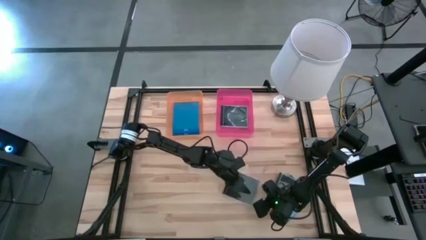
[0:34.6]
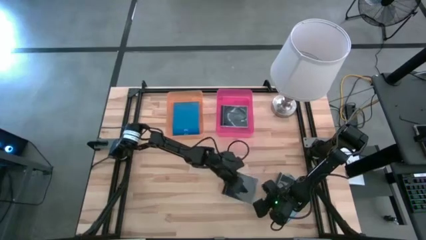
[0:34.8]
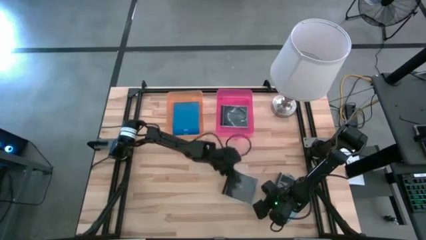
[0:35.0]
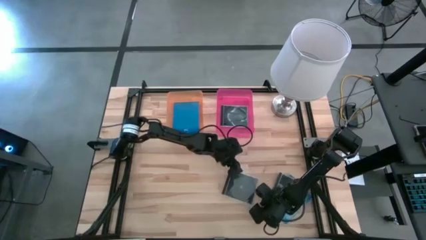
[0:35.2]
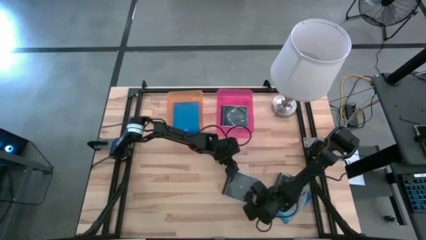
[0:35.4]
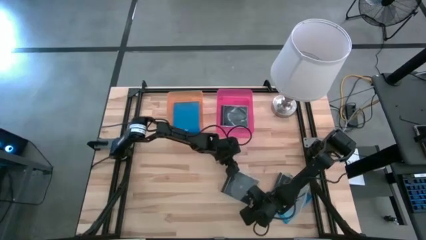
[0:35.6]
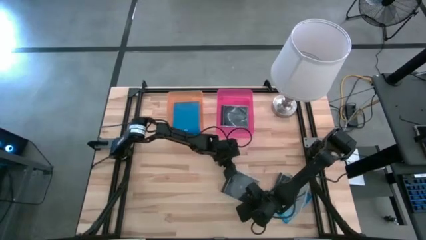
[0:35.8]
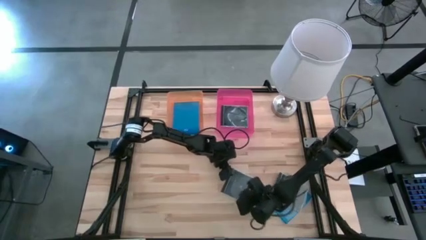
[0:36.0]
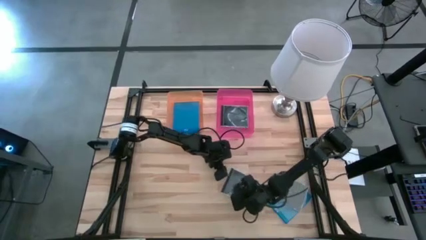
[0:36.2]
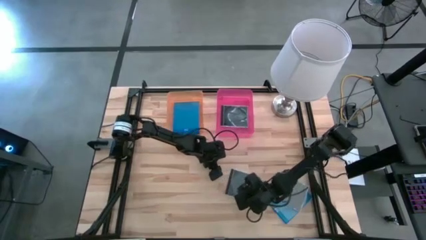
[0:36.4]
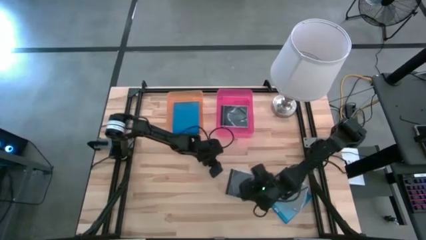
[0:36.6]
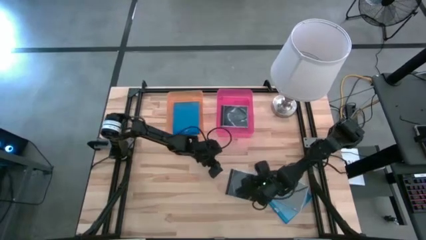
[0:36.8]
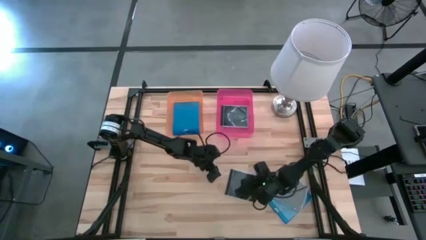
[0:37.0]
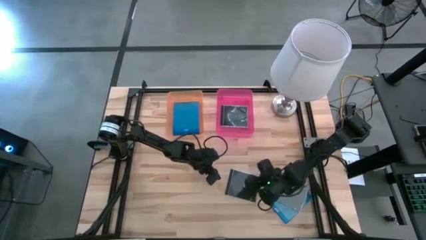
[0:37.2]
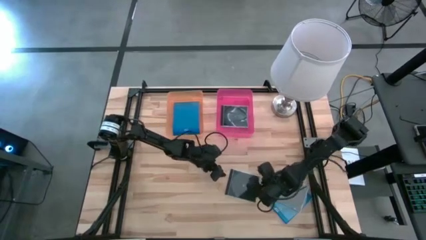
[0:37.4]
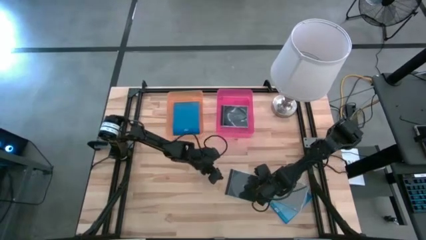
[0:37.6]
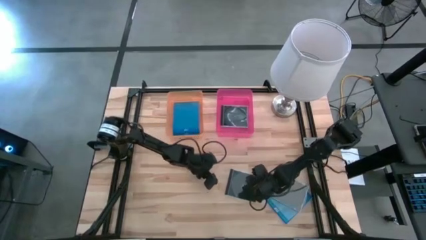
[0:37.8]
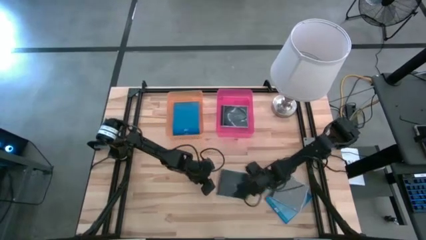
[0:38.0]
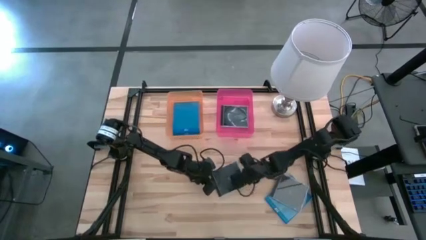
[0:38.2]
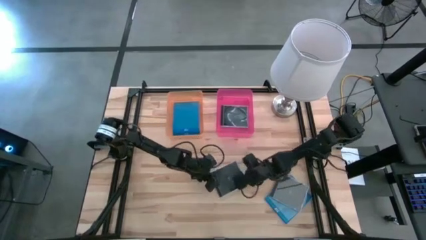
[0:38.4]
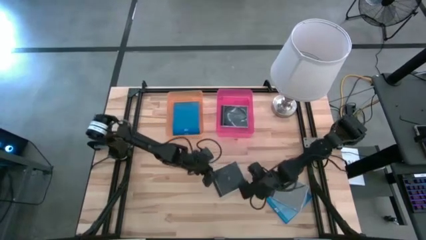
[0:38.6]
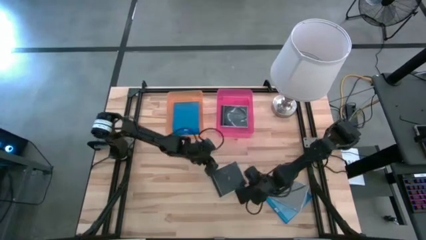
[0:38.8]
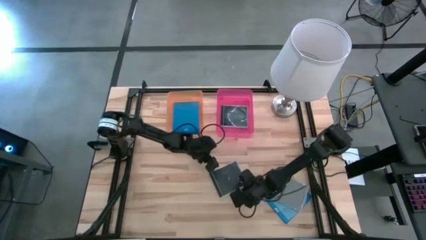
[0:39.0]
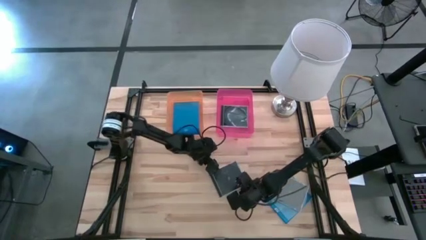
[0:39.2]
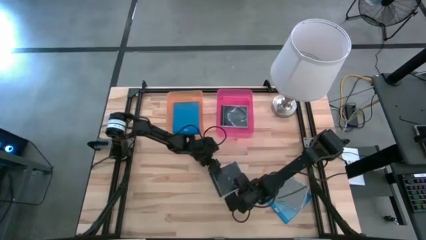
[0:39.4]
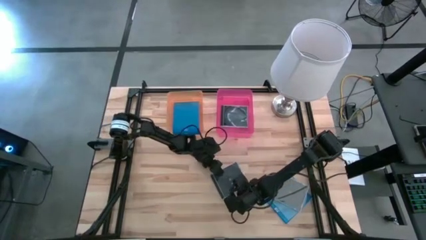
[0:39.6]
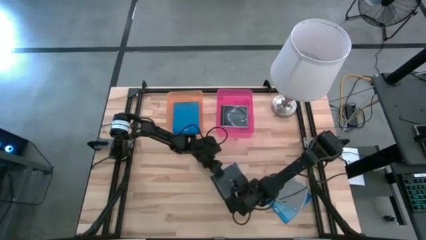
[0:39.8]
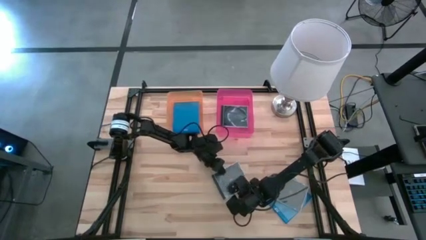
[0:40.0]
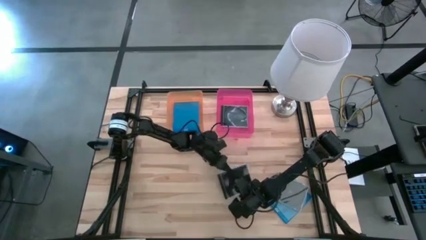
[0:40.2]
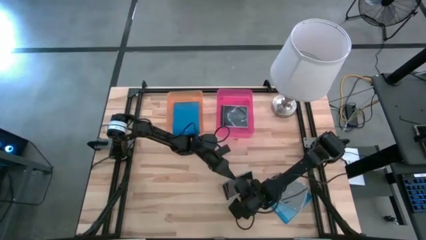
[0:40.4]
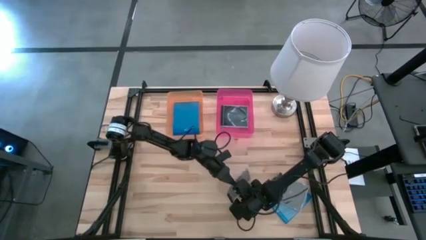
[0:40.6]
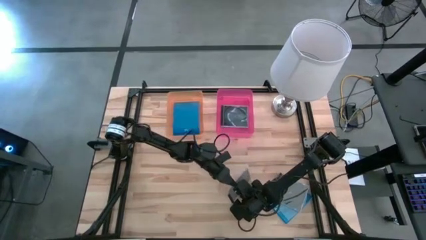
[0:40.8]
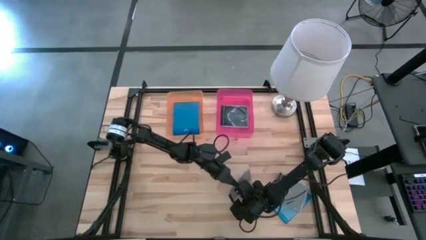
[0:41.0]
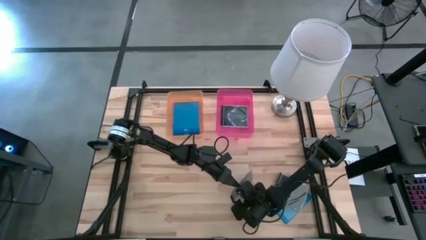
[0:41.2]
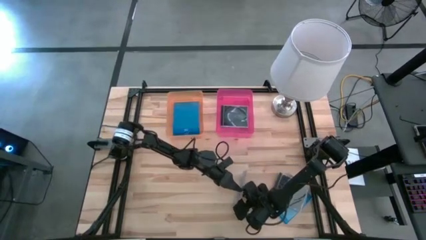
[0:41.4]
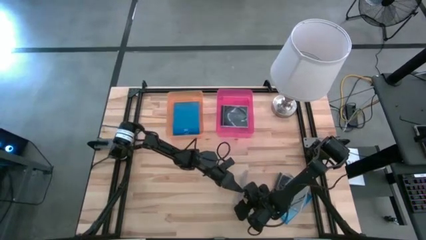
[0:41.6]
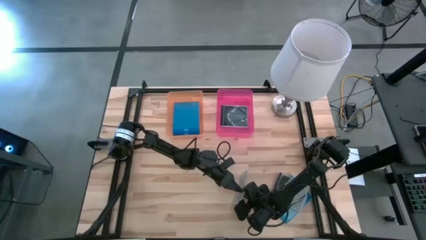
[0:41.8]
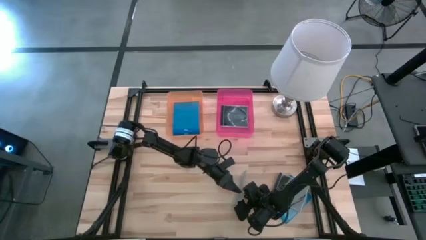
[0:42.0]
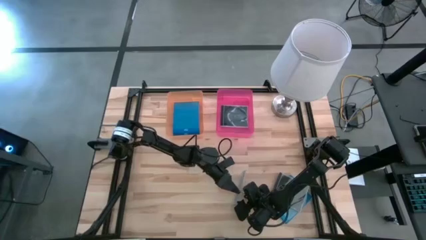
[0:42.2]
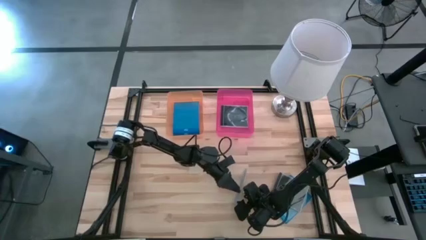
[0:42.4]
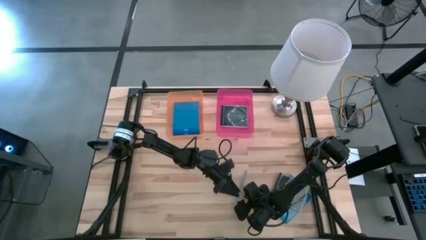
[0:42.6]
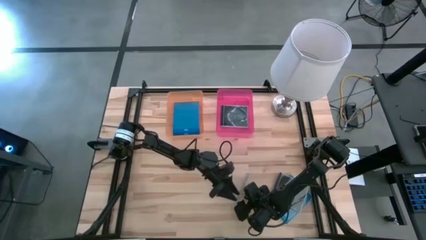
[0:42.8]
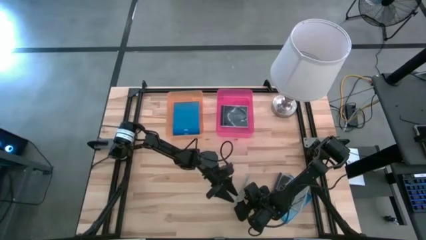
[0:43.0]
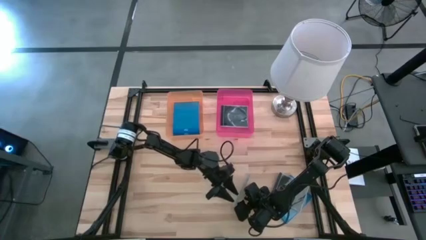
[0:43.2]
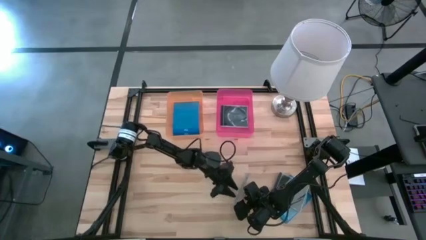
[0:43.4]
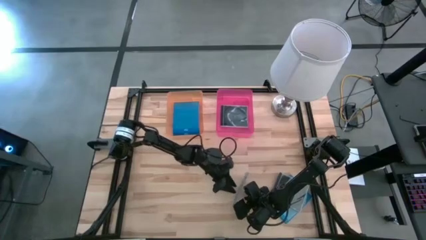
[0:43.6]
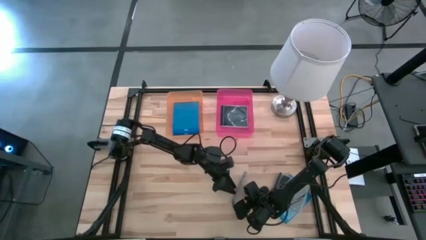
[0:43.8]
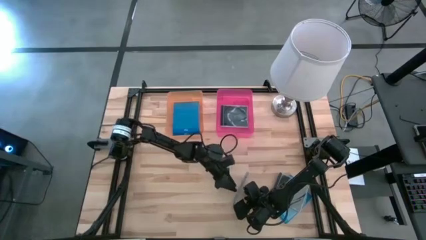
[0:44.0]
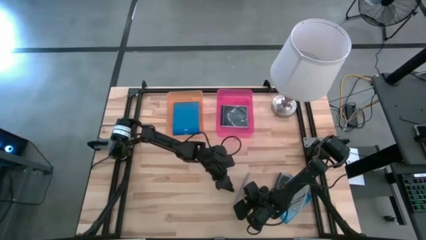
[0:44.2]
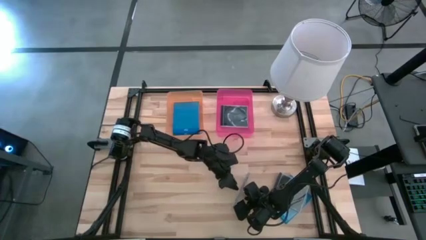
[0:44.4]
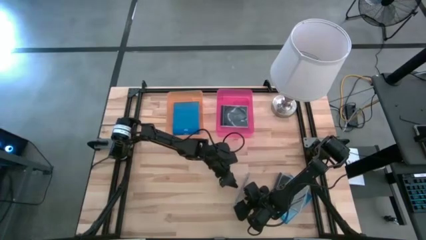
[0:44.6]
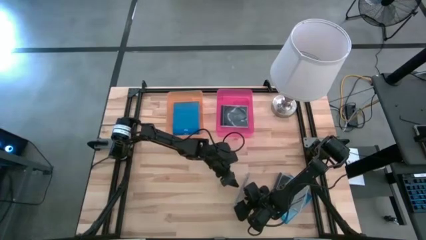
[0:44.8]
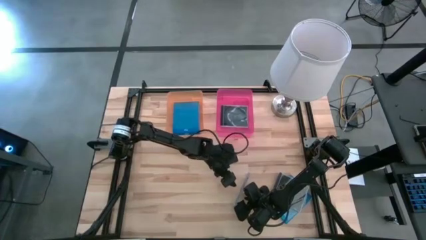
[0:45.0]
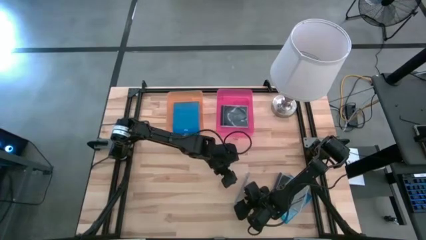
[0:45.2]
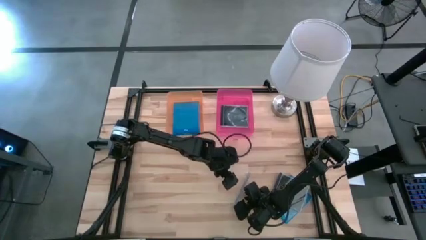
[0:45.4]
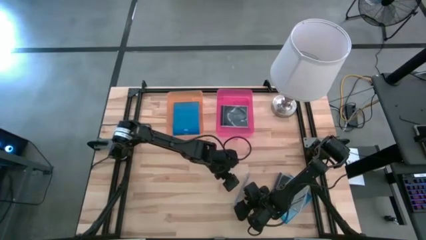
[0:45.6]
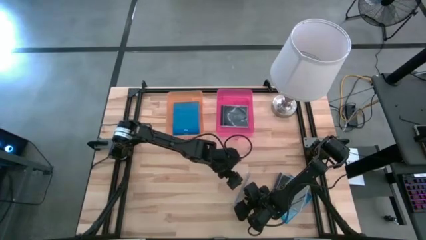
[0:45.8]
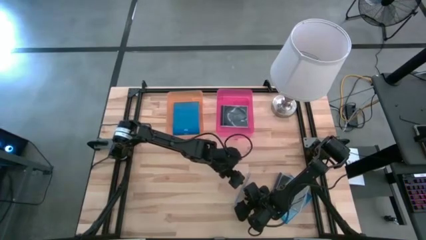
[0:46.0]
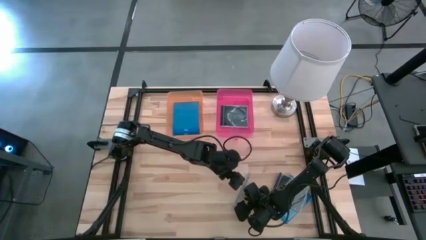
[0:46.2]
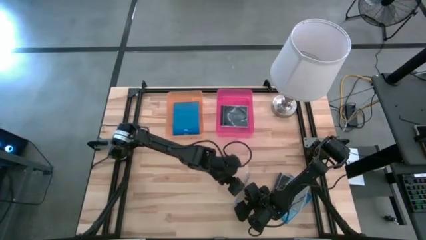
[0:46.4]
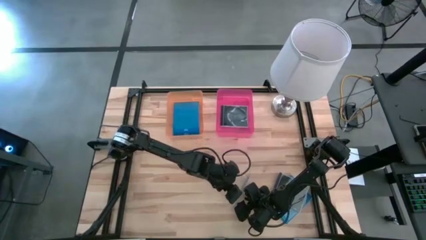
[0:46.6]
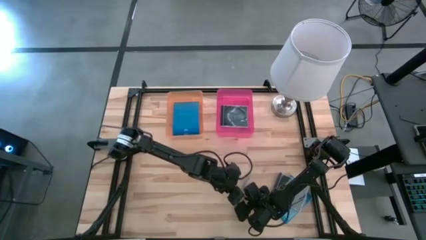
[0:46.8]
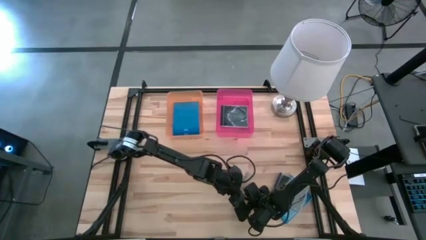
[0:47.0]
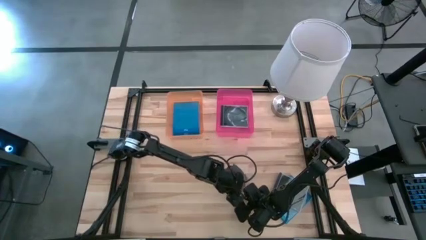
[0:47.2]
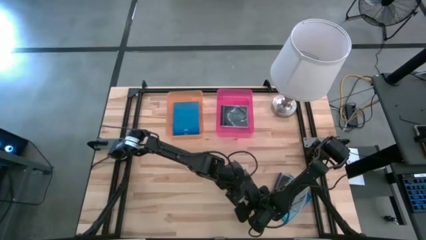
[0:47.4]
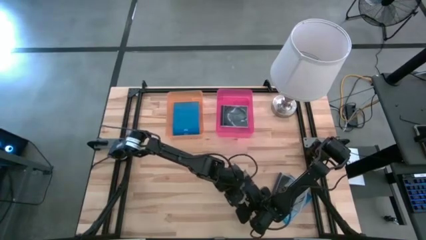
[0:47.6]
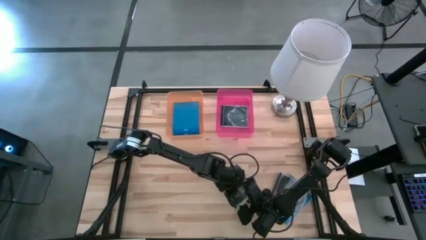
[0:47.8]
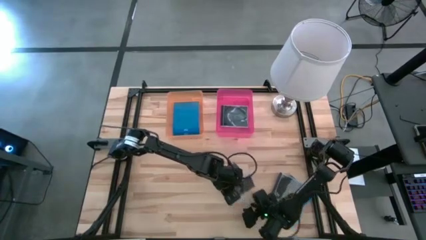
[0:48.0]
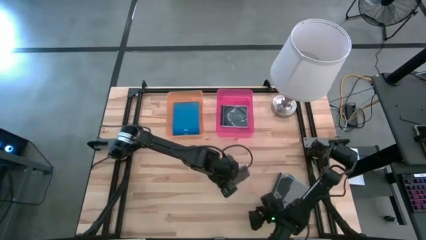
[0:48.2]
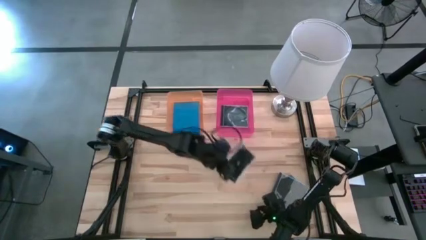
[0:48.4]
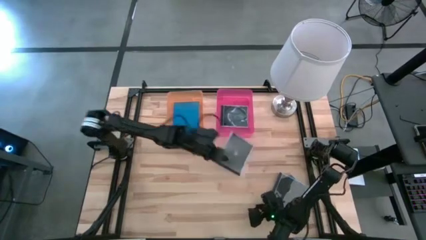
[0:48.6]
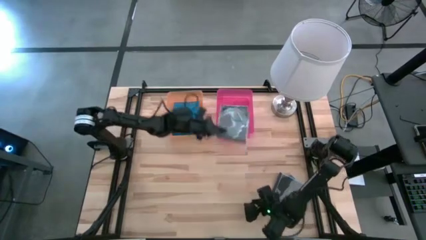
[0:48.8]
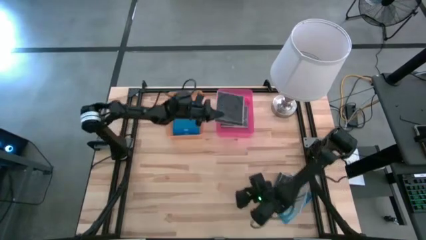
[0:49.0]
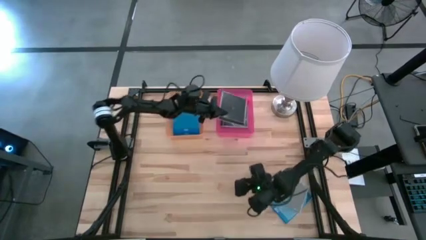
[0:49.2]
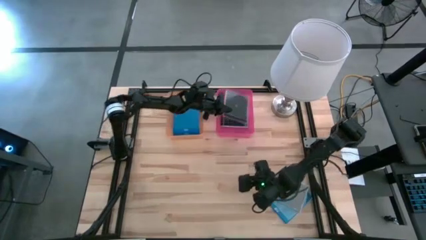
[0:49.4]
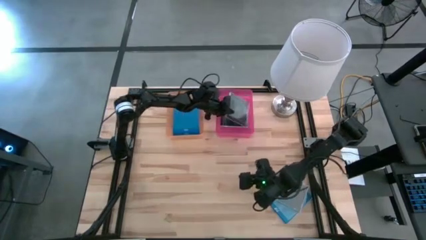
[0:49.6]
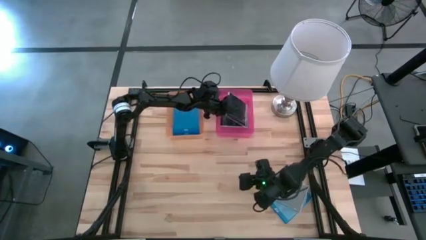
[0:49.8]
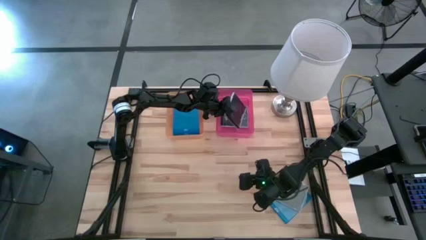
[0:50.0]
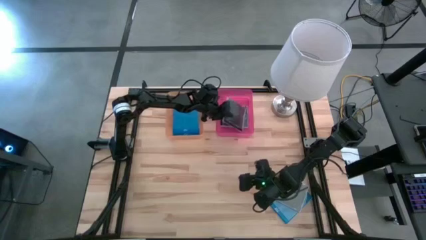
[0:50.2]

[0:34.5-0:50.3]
Task: Pick & place jewel cases by type
Put the left black CD case into the pink bin
